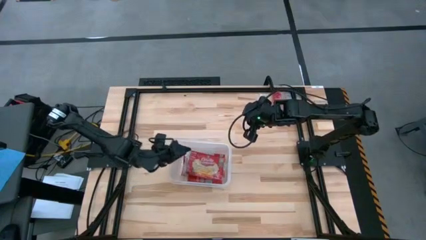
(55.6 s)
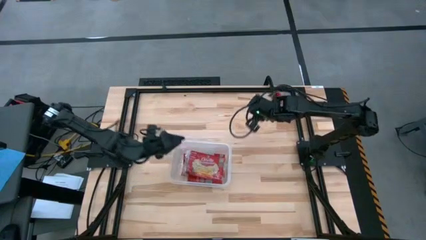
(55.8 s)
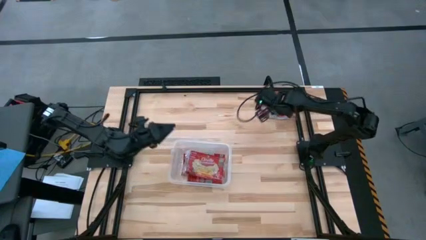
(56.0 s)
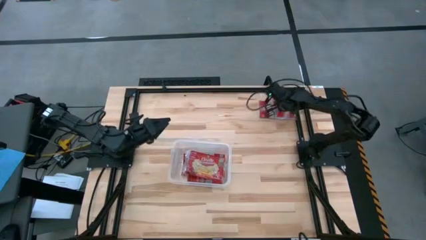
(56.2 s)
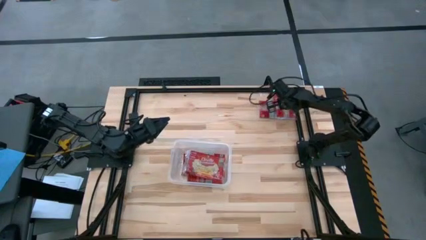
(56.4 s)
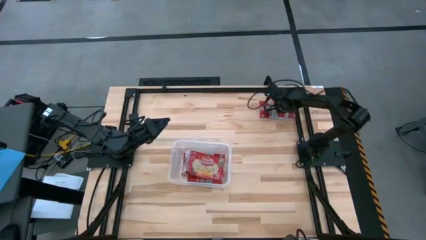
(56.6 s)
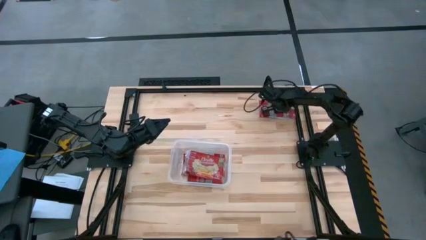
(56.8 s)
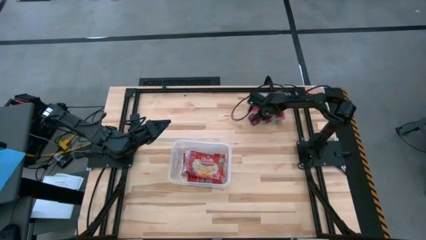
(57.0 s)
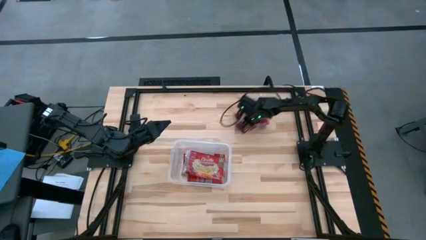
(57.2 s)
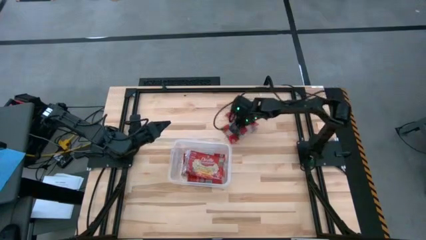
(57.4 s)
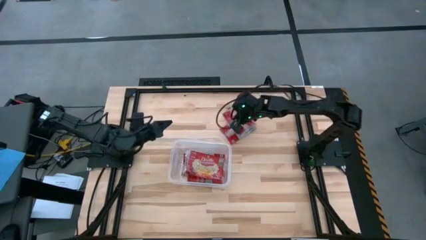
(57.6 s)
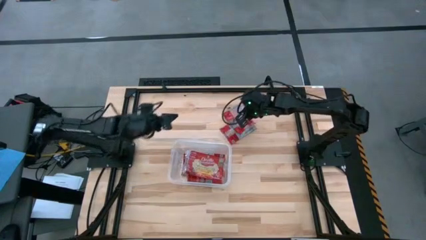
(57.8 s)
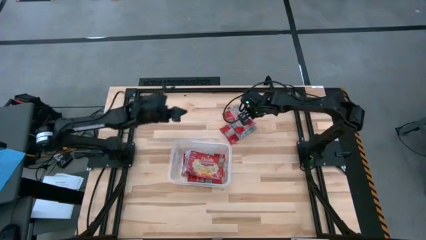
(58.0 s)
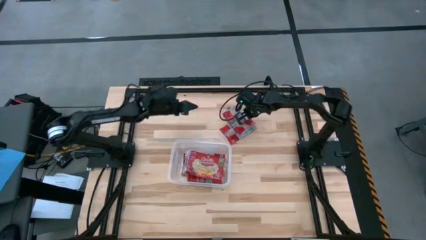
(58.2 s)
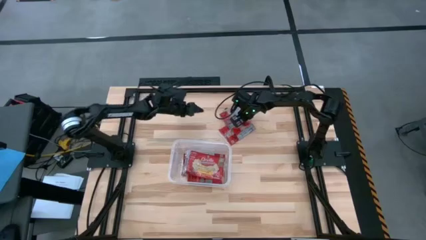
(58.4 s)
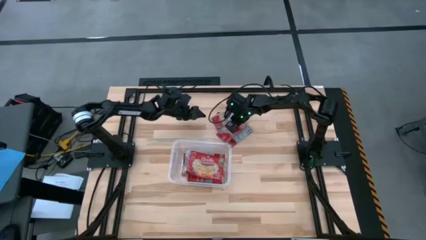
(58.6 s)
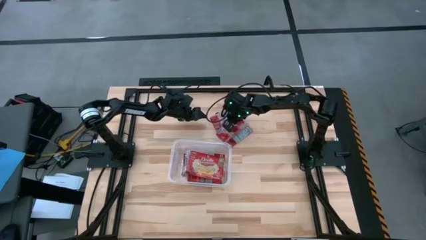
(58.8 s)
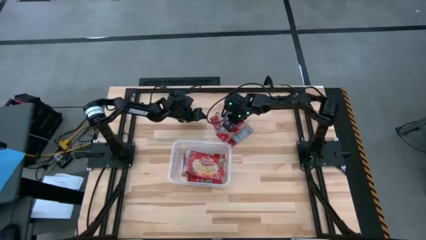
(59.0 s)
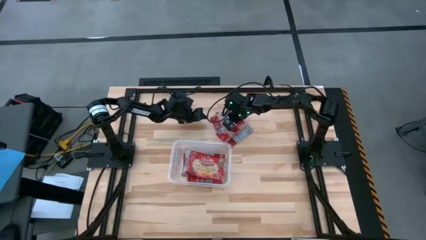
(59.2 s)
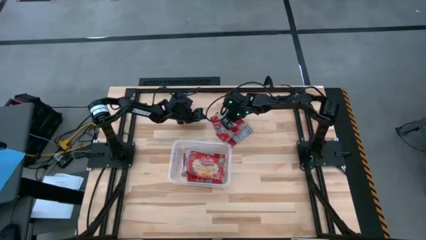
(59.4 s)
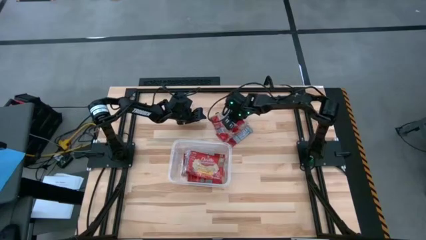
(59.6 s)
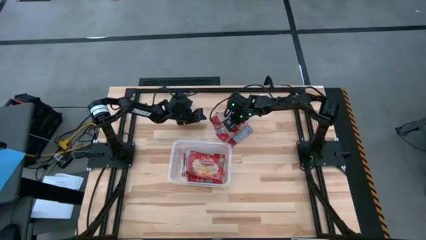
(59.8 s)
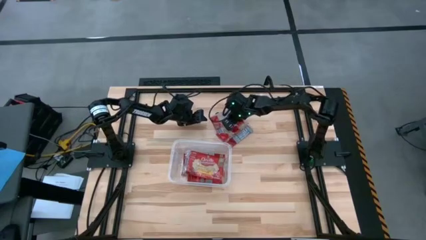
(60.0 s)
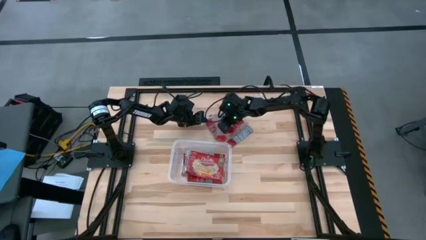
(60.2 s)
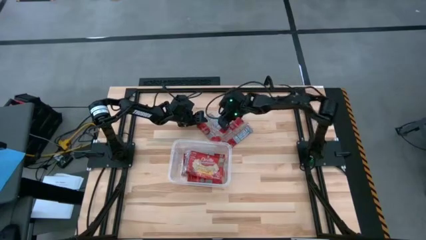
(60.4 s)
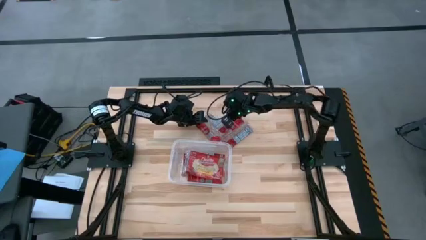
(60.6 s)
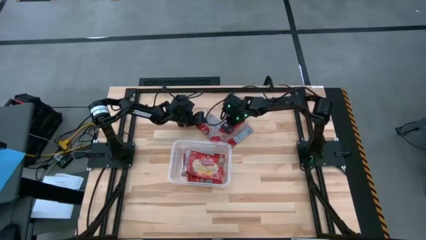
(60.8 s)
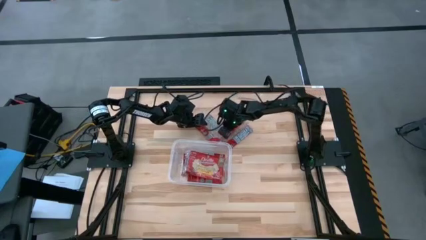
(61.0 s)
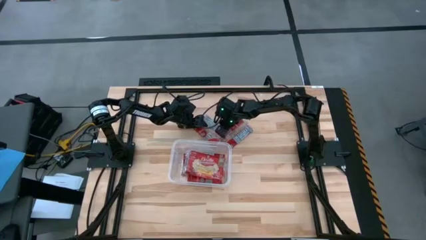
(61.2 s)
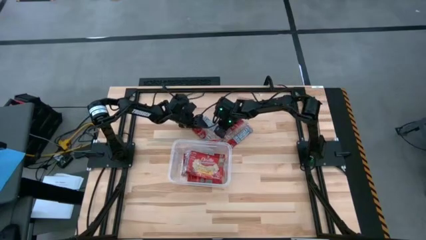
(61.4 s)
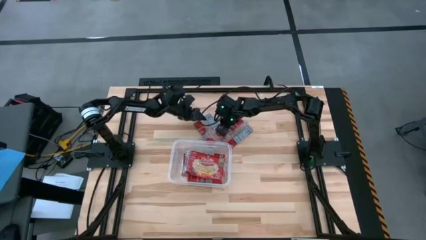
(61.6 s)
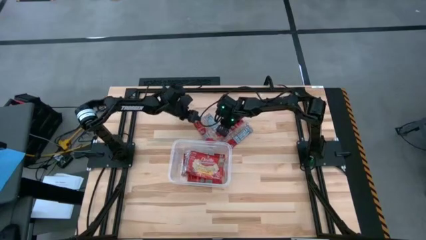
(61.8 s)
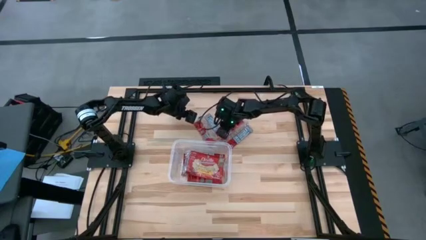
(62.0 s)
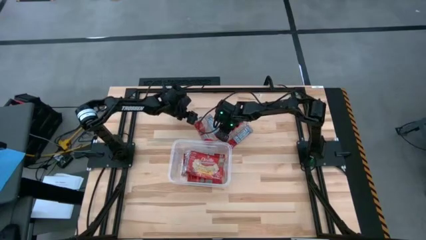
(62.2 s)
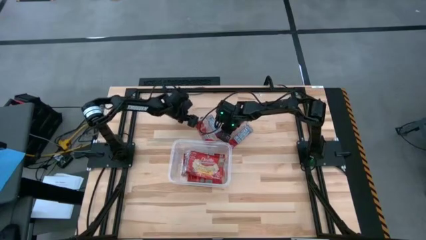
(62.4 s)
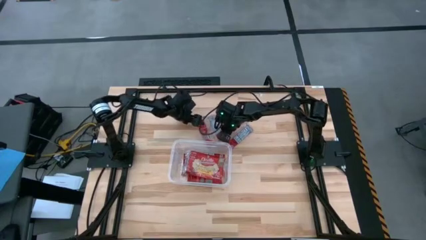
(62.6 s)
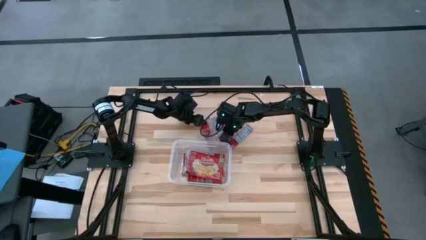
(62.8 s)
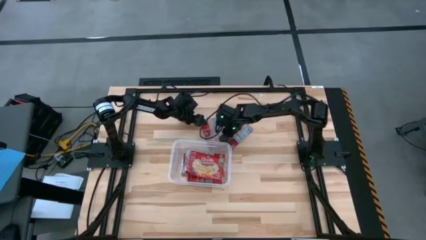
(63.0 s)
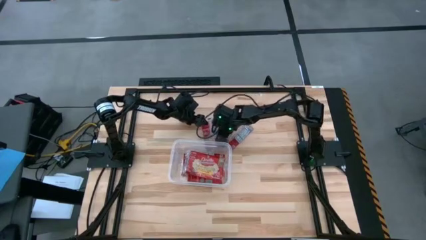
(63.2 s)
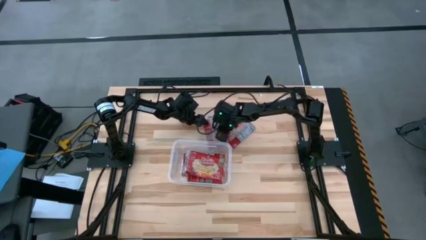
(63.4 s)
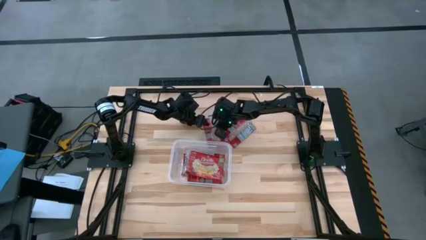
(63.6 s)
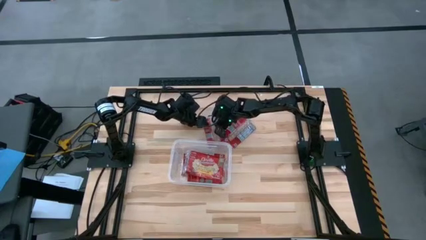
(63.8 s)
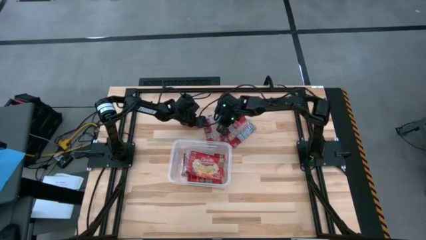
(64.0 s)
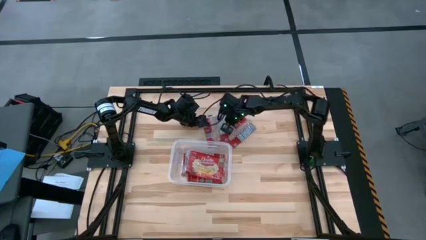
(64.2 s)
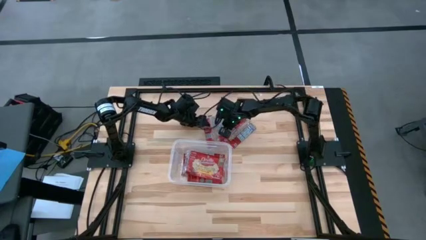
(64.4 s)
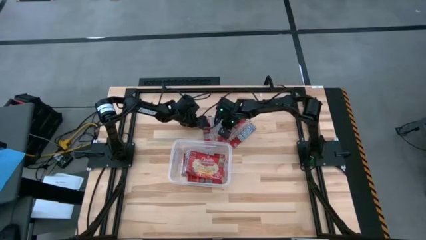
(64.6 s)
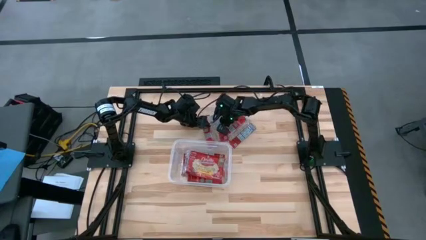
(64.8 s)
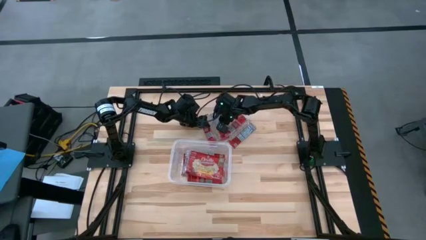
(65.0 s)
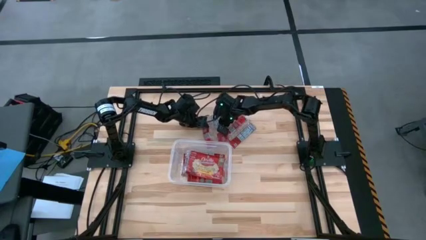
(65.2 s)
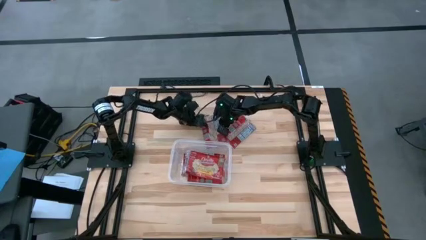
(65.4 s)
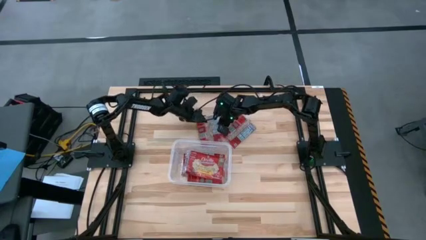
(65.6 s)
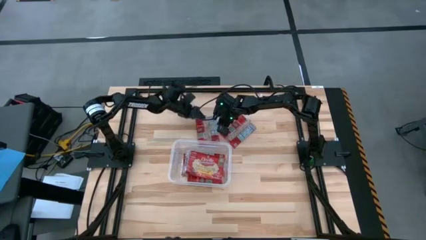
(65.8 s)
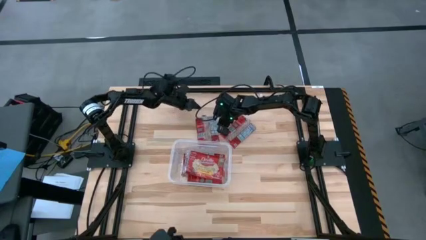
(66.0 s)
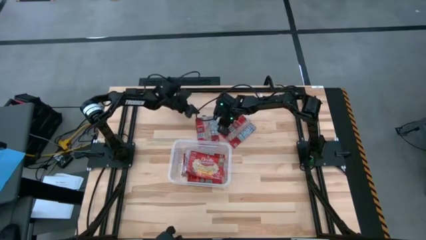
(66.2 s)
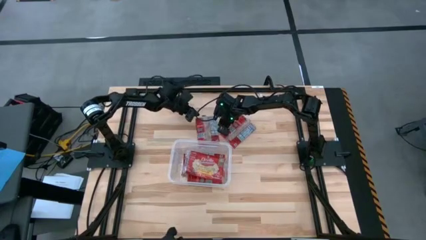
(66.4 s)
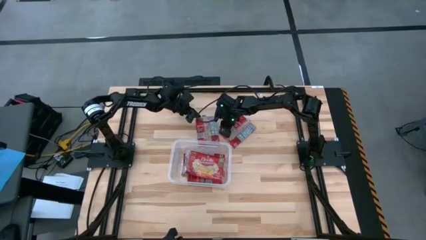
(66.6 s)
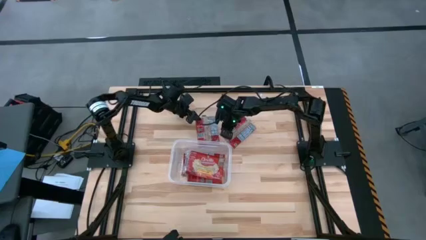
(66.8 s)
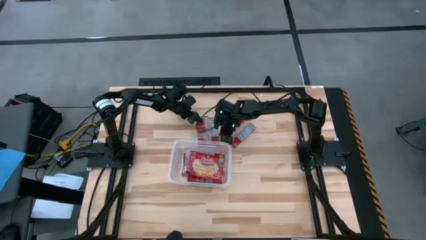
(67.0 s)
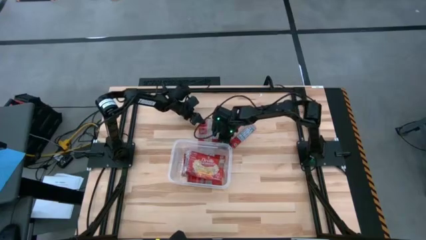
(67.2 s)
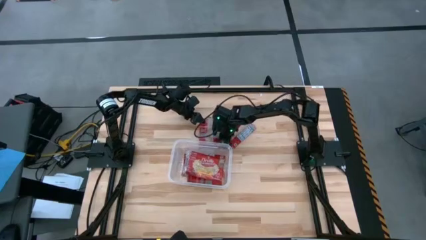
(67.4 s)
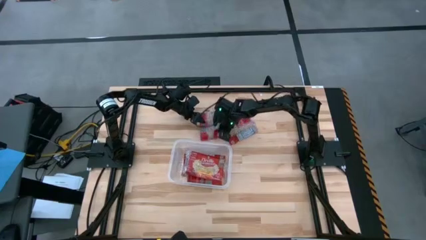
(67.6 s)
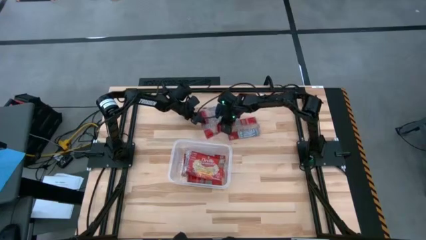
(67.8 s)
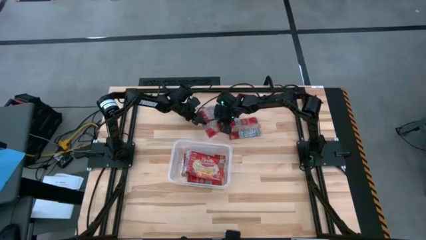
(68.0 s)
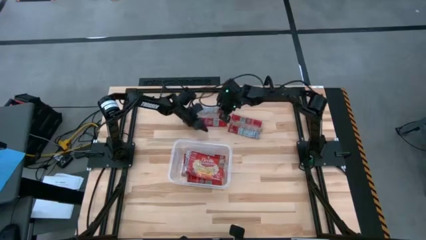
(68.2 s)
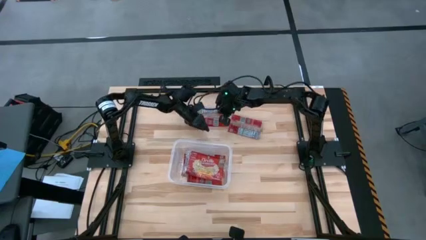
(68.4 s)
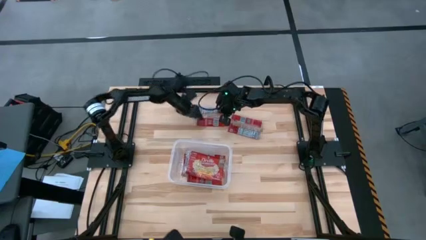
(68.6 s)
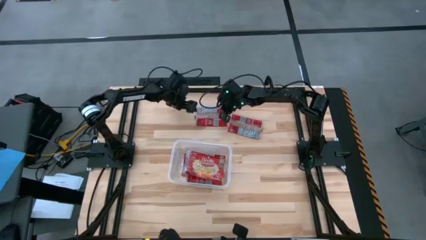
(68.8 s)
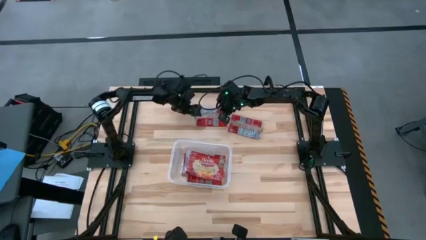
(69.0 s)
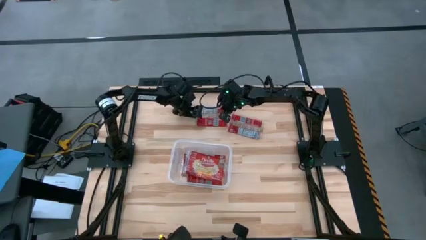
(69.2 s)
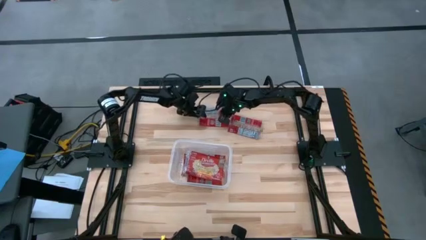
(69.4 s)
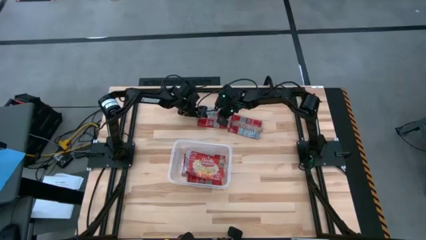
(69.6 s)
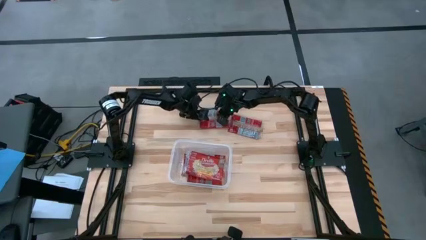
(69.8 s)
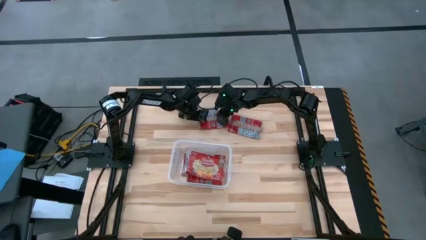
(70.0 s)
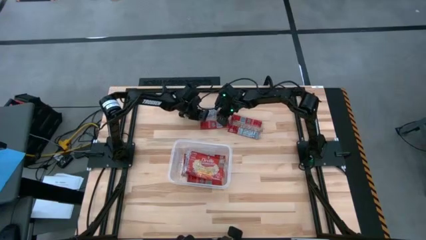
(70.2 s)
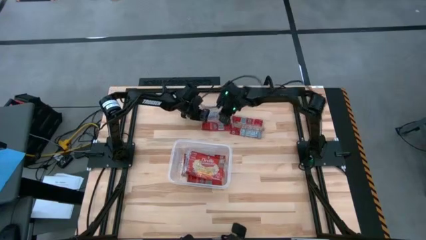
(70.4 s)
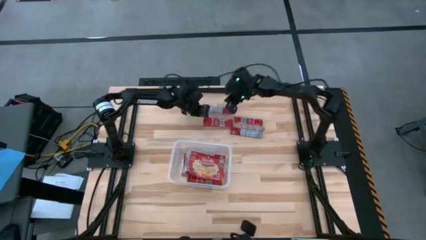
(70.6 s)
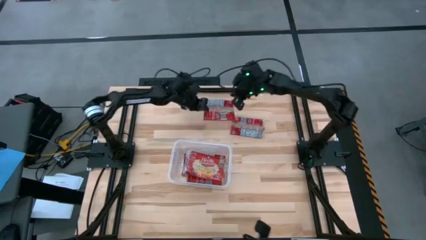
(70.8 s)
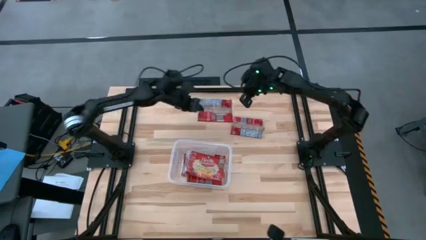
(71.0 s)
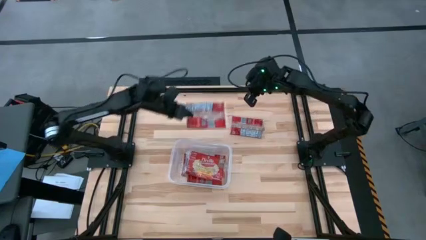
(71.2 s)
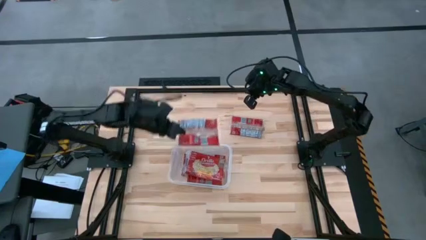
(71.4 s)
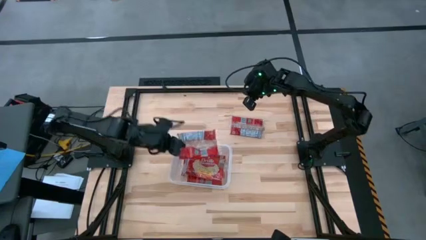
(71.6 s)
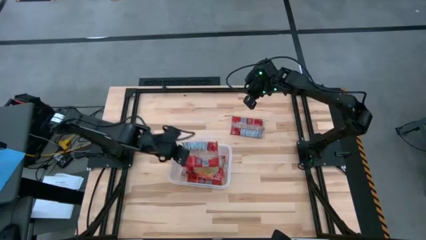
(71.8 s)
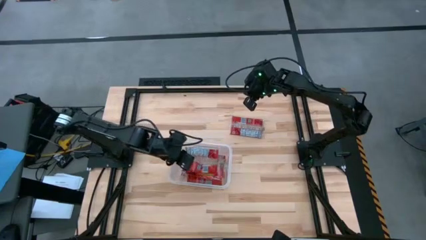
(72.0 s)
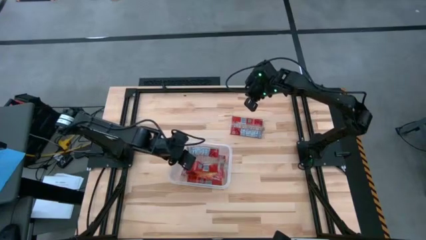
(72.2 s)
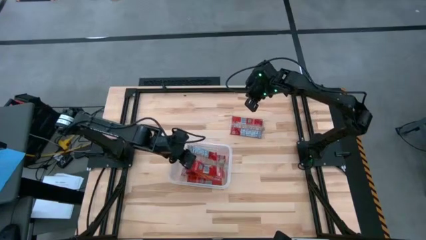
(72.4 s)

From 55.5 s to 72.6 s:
Task: Sort popcorn bags into baskets
Put the red popcorn bag into the container

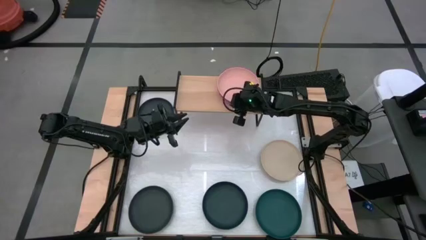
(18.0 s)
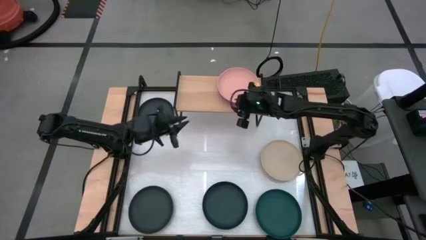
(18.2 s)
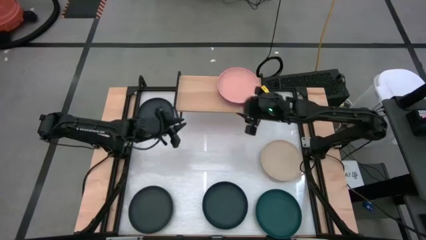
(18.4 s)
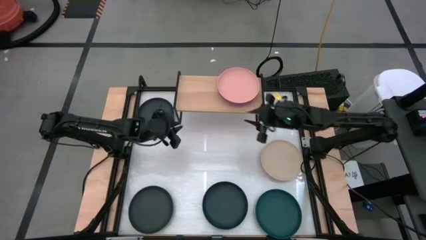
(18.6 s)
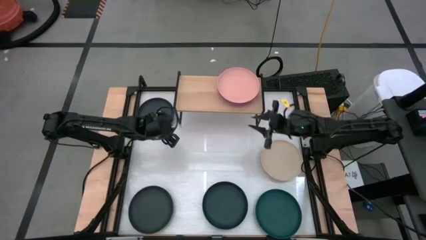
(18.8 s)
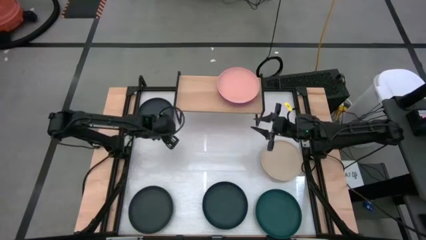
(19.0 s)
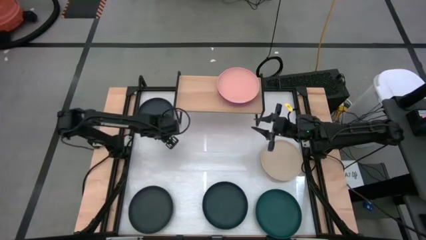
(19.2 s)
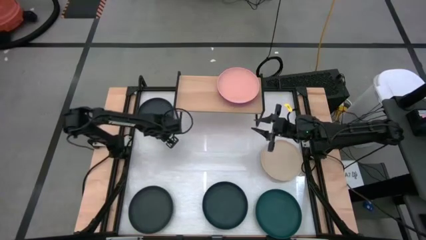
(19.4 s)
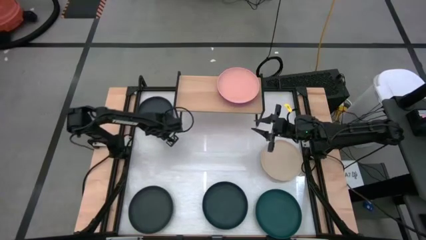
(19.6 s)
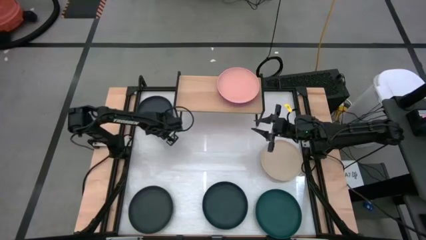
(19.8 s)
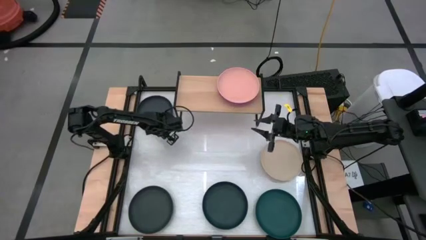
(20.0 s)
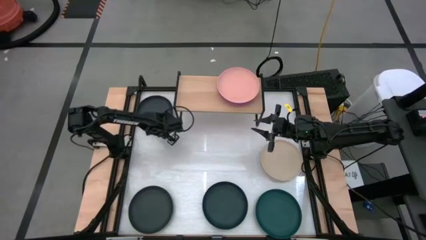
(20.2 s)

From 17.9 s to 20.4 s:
Task: Place and stack plates onto a shelf
Stack the top black plate on top of the light pink plate on the shelf
